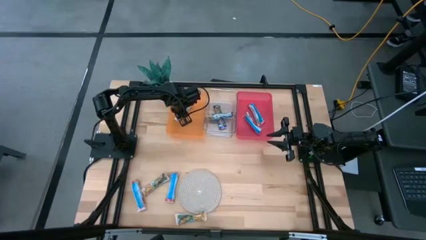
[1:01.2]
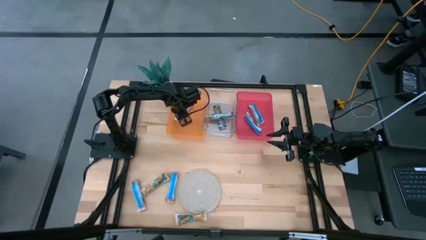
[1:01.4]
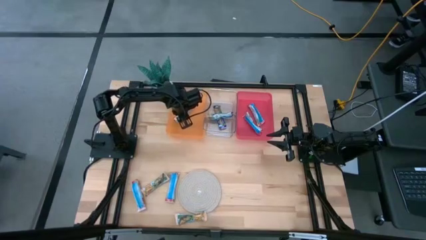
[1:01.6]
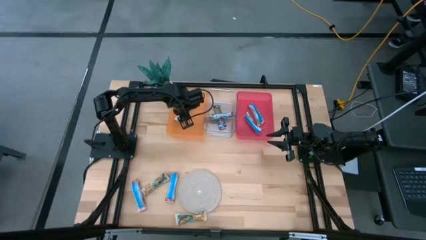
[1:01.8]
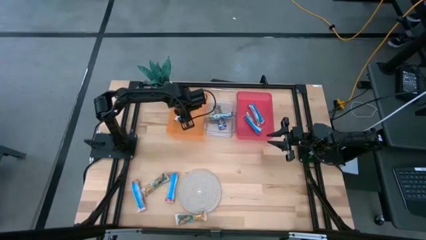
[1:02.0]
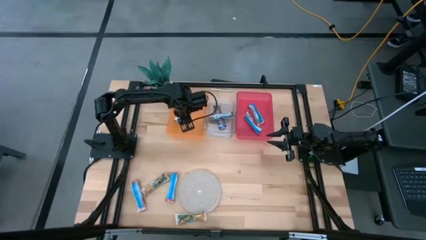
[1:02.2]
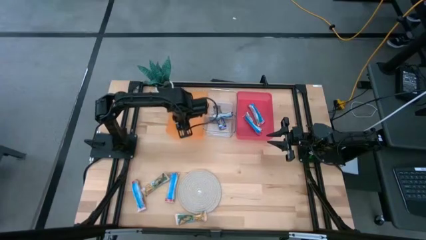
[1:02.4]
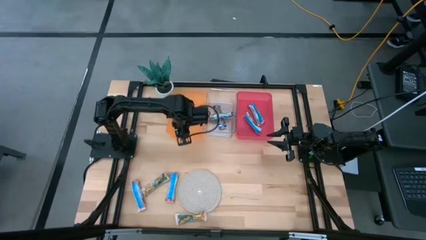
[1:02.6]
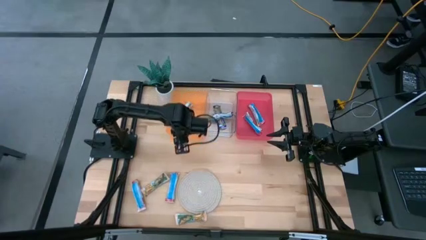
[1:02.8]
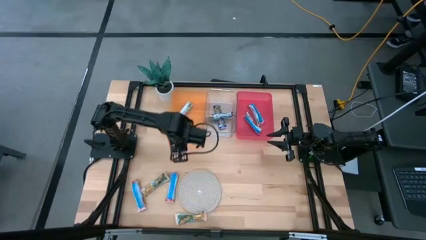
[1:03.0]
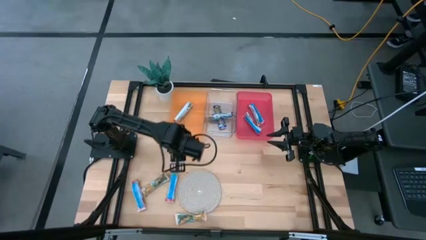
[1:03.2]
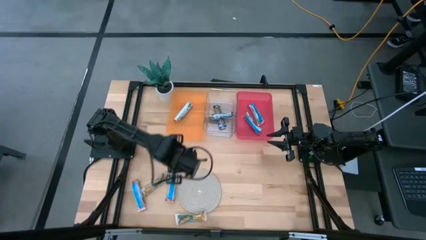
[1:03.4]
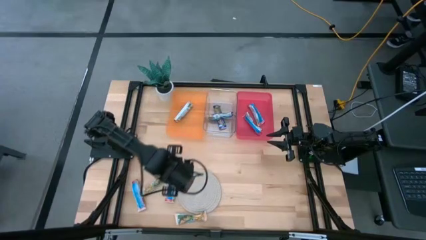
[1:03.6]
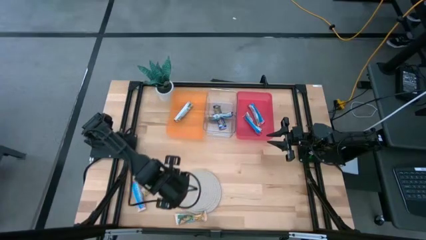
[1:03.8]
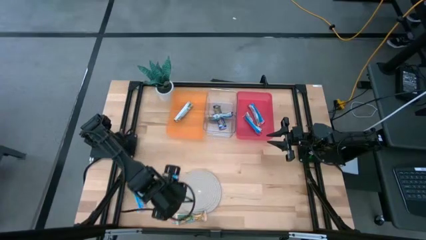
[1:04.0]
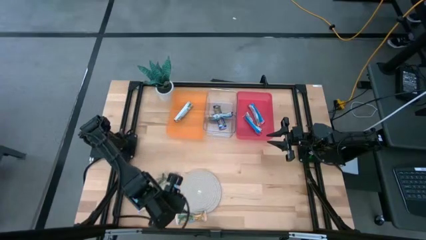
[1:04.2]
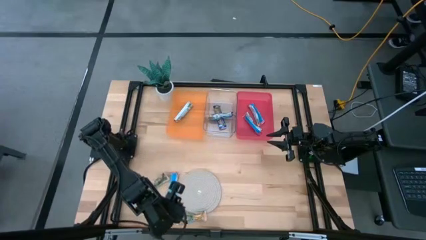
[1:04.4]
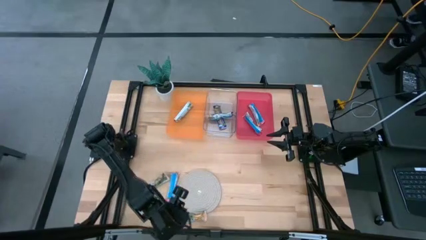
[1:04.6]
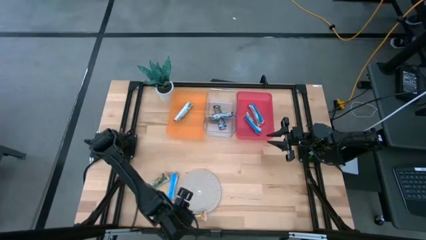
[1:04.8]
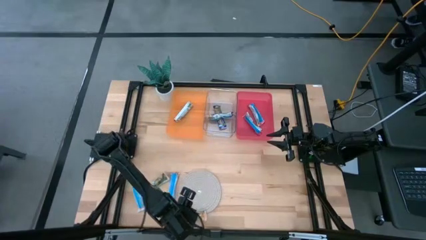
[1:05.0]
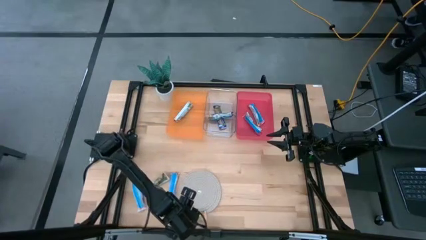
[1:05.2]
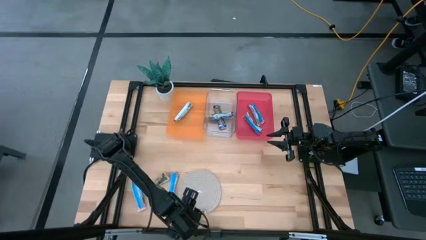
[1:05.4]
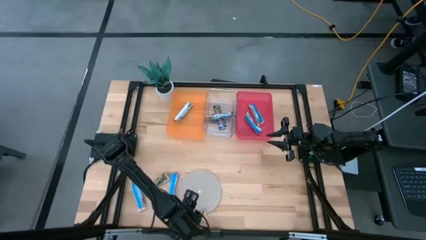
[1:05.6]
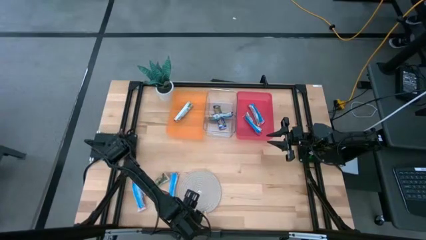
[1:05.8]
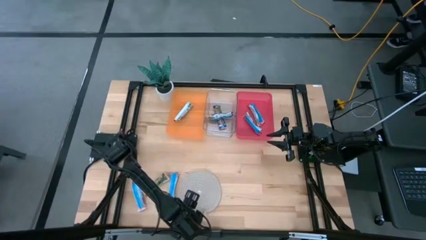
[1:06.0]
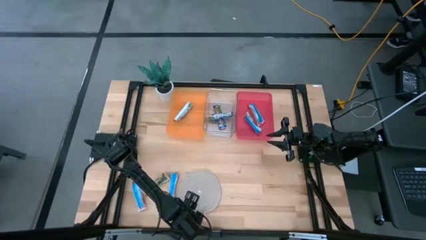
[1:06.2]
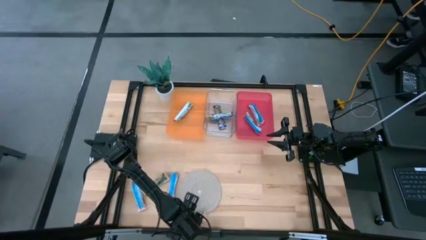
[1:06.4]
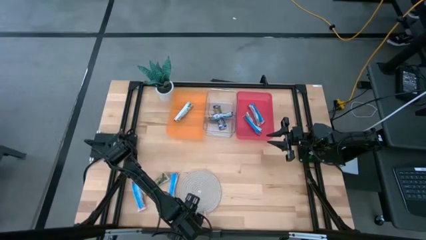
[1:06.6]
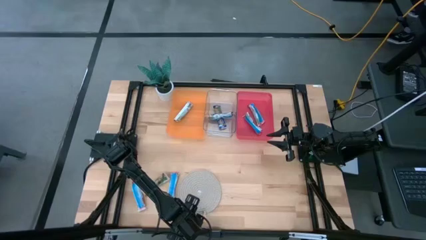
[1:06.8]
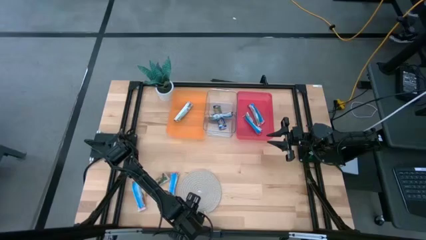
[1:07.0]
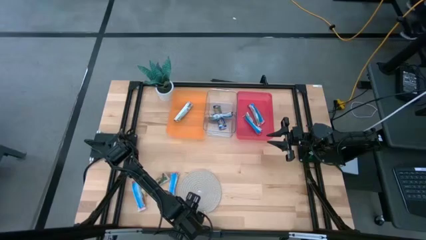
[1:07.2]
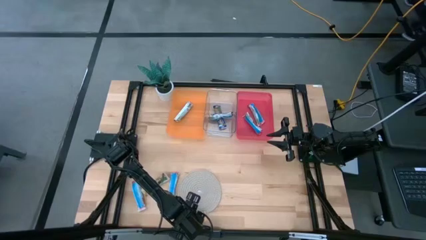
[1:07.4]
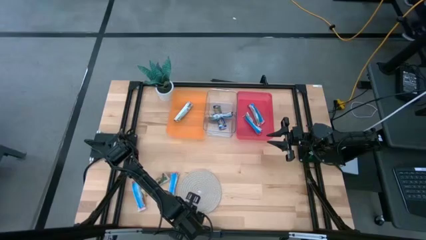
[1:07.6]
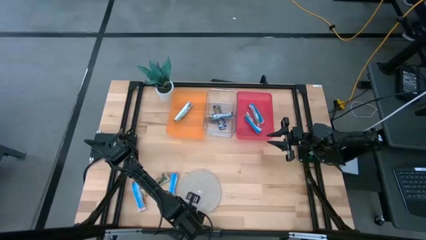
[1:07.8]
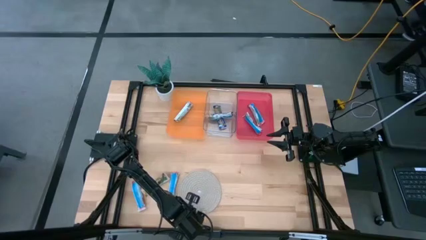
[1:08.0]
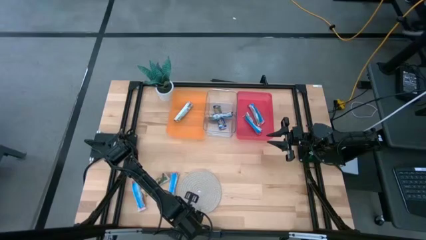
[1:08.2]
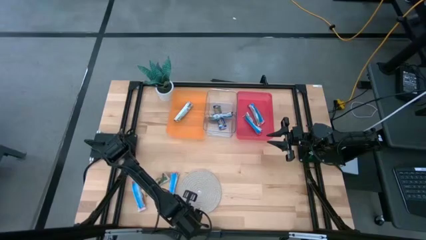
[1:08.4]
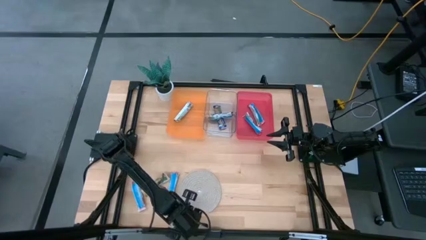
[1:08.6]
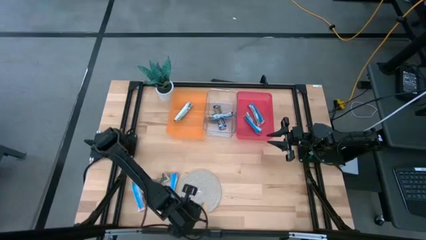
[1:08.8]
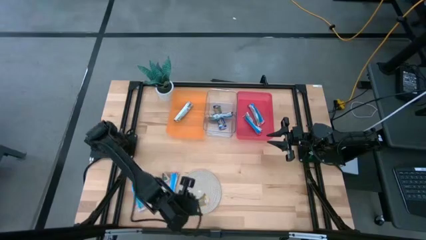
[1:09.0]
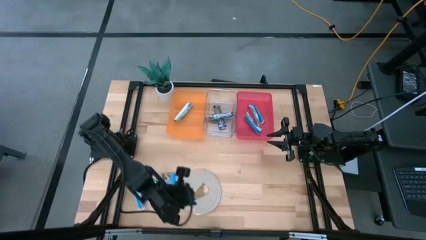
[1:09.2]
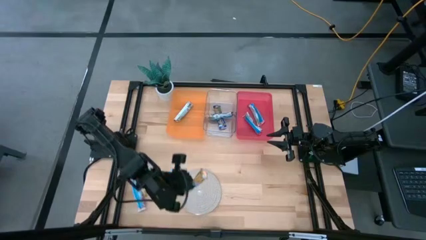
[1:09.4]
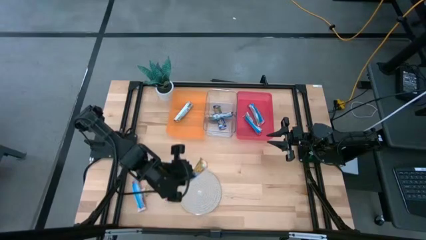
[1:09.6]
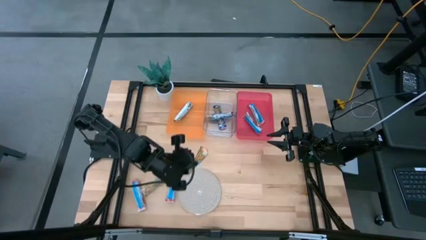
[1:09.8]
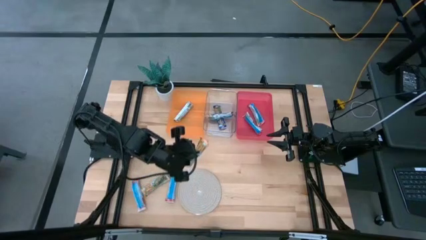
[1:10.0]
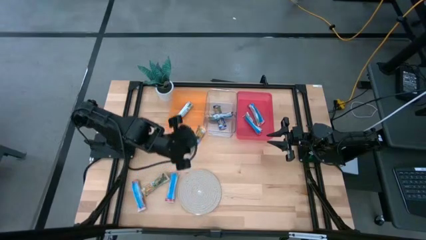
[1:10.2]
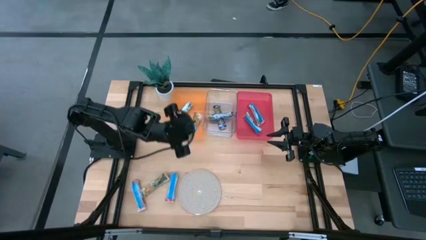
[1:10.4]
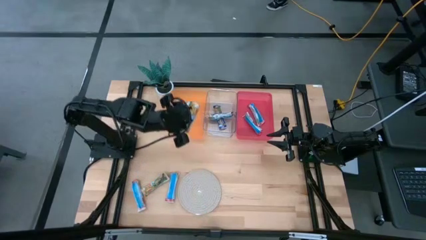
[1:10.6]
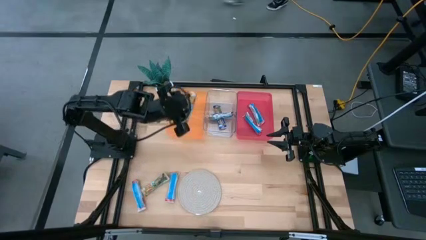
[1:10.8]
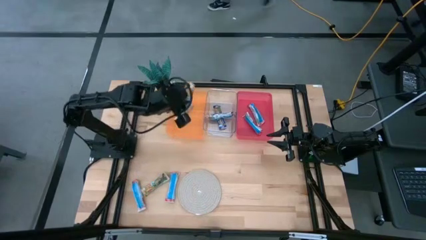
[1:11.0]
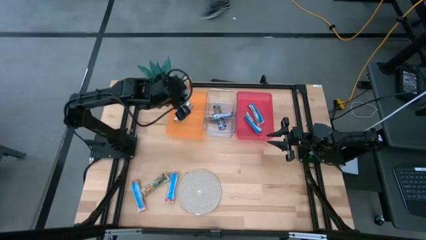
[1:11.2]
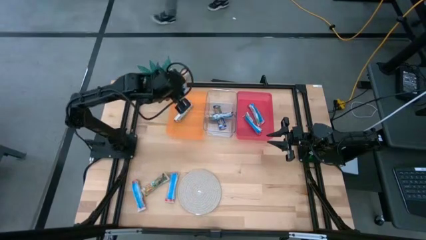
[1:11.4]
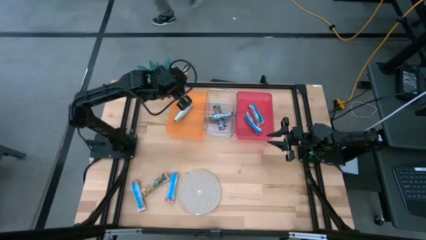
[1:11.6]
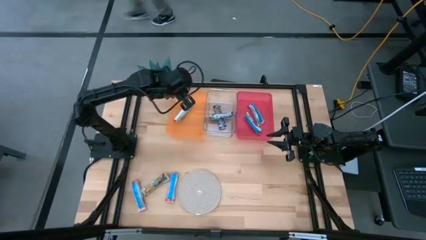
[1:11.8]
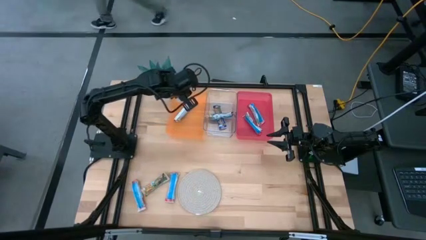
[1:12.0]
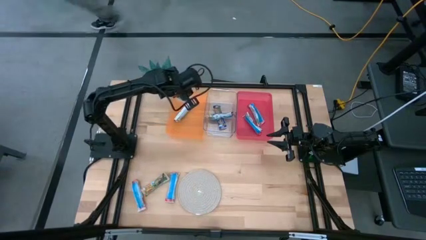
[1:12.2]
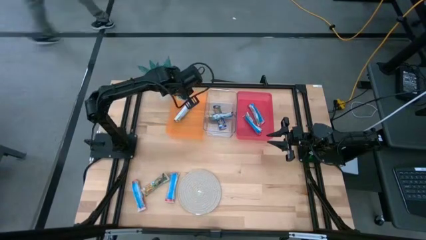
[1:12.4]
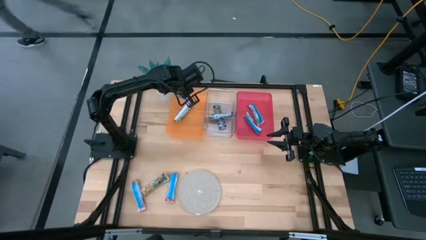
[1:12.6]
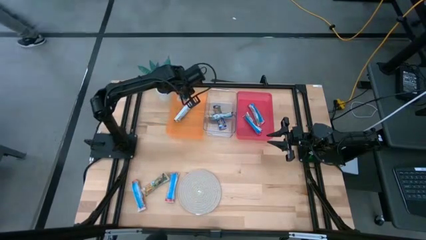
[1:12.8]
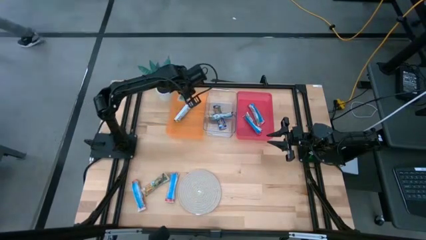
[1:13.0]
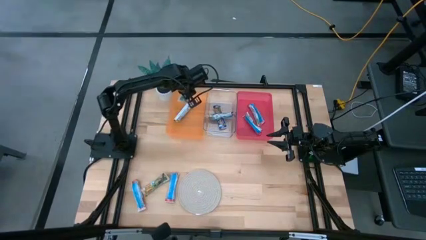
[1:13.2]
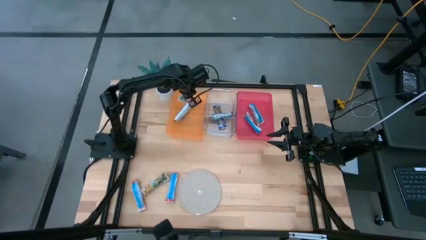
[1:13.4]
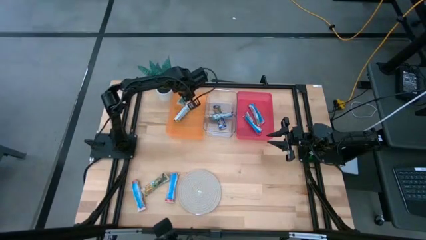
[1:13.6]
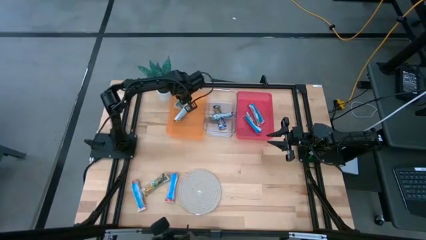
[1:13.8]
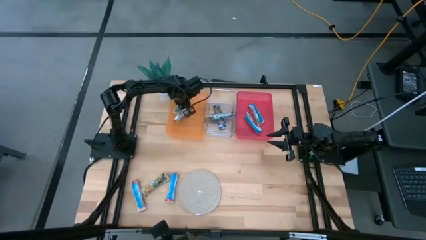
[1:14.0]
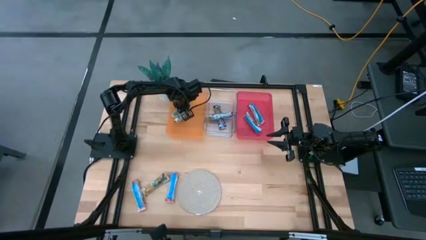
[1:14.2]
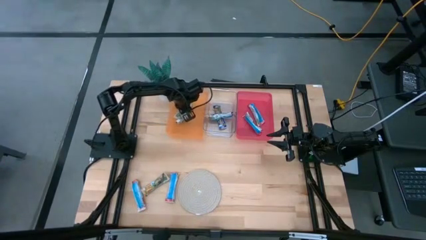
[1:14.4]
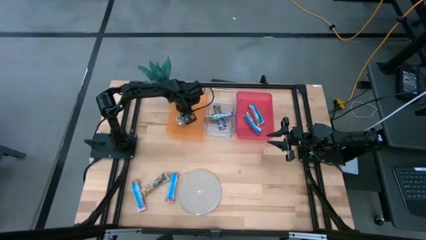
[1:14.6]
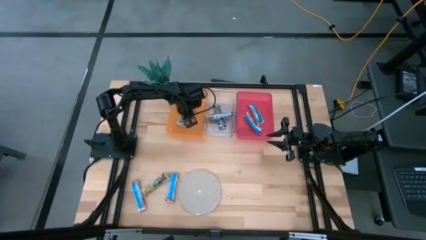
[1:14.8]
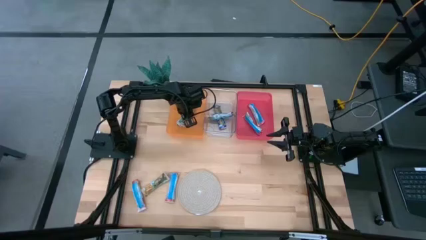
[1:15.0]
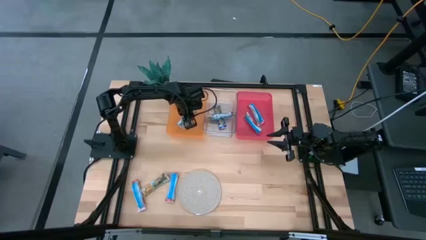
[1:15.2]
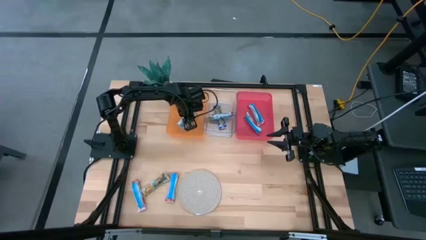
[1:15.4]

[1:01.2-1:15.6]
Task: Pick and place Granola Bars by type
Put the bottom orange granola bar into the orange bin
